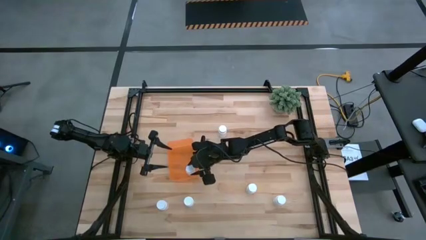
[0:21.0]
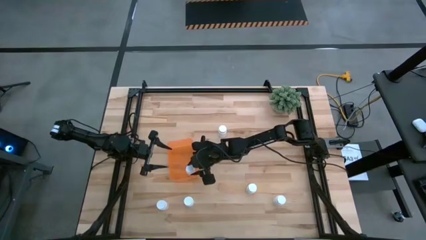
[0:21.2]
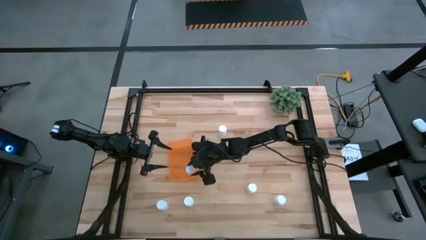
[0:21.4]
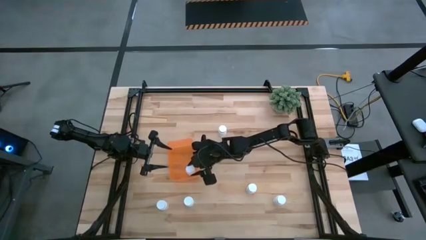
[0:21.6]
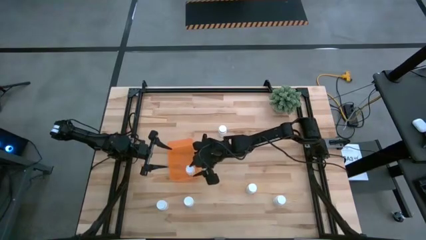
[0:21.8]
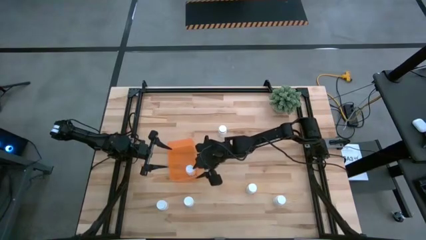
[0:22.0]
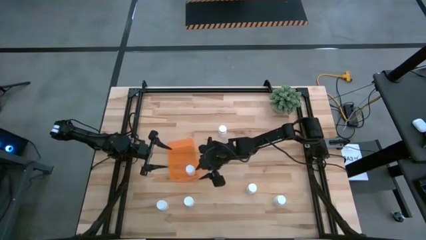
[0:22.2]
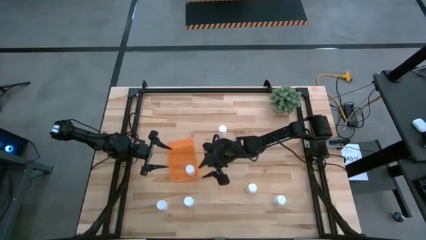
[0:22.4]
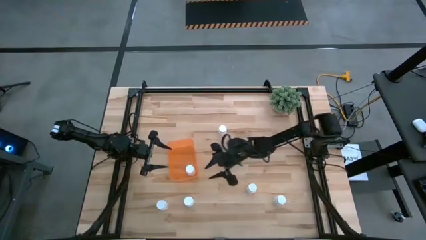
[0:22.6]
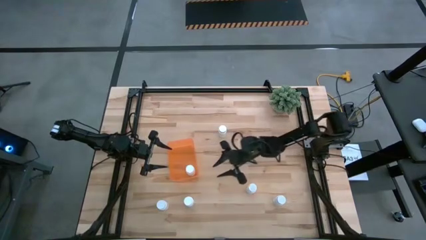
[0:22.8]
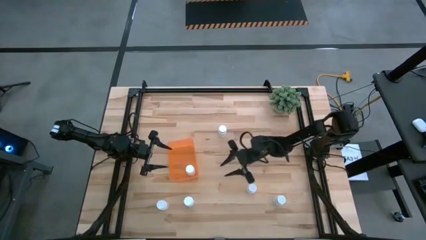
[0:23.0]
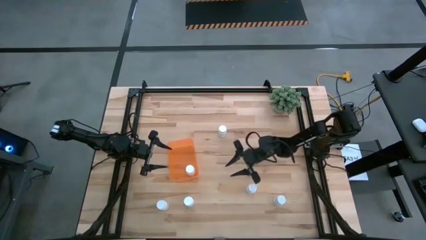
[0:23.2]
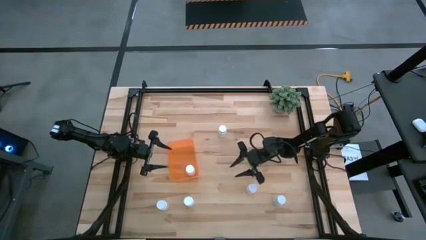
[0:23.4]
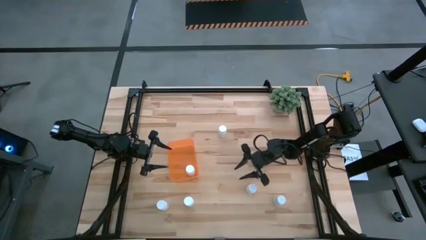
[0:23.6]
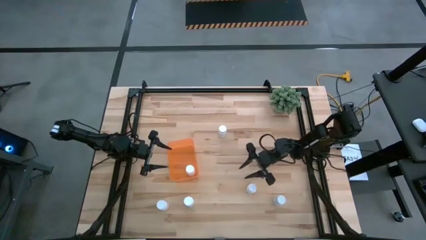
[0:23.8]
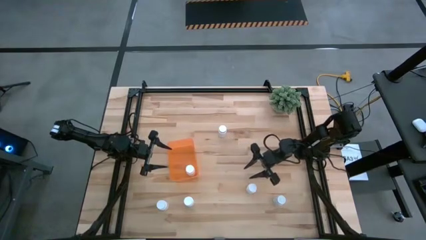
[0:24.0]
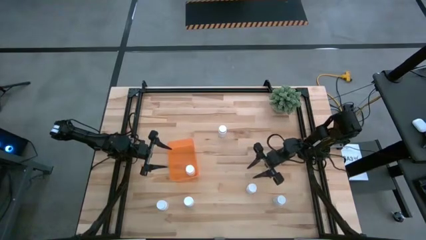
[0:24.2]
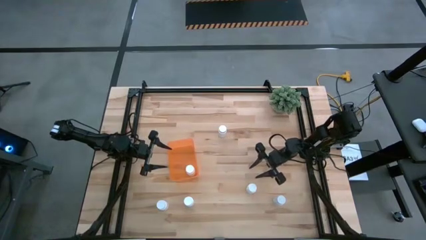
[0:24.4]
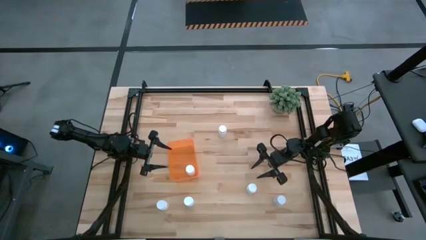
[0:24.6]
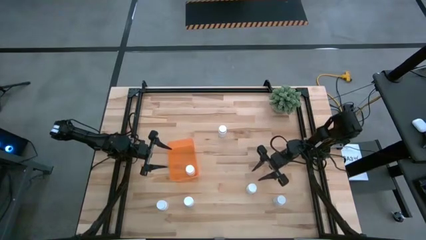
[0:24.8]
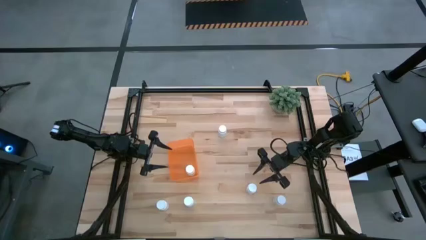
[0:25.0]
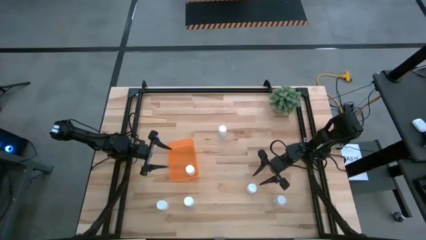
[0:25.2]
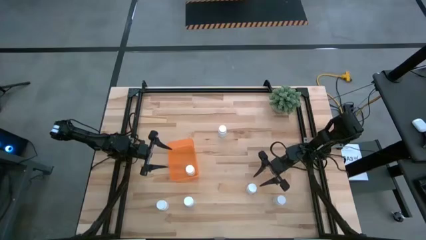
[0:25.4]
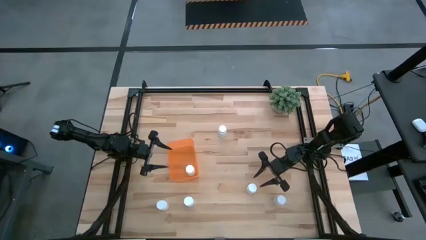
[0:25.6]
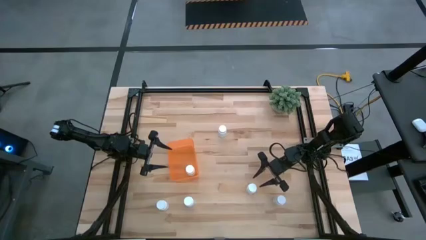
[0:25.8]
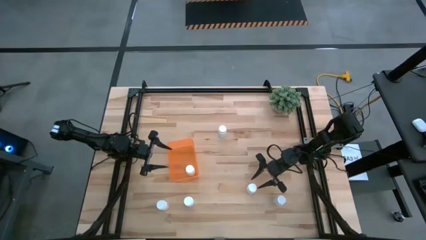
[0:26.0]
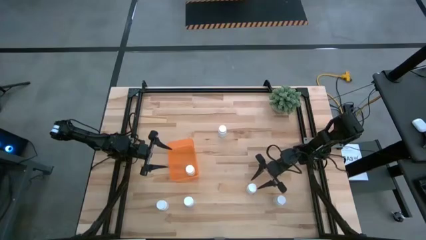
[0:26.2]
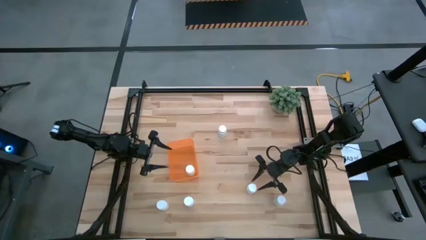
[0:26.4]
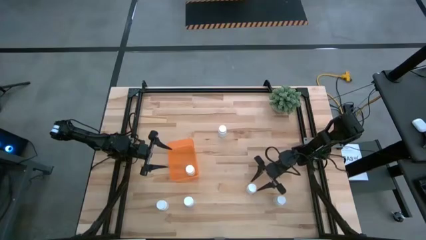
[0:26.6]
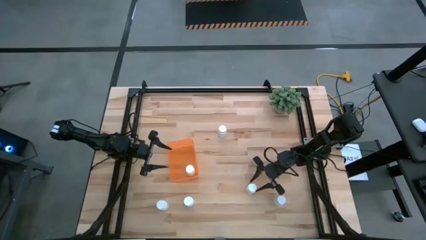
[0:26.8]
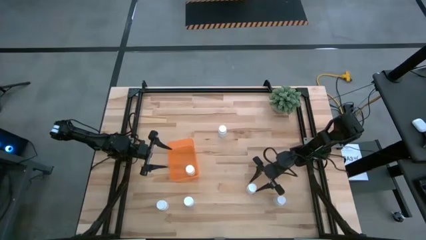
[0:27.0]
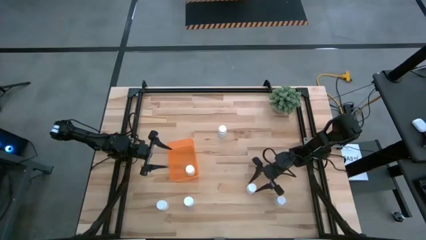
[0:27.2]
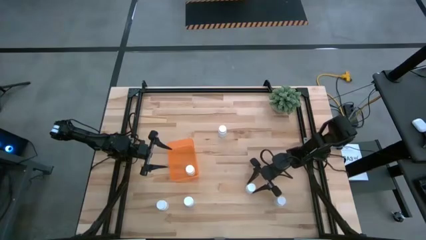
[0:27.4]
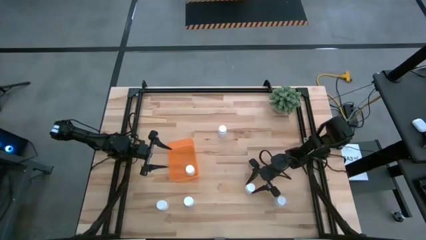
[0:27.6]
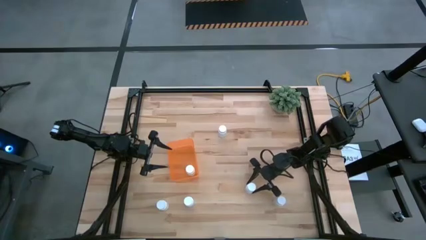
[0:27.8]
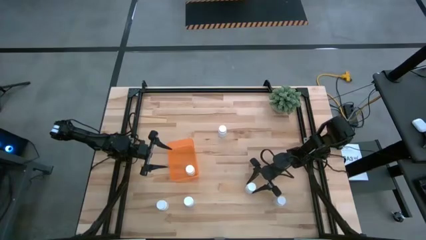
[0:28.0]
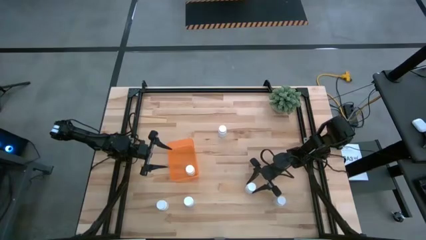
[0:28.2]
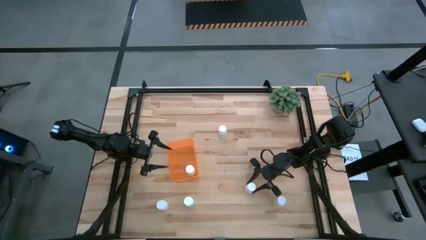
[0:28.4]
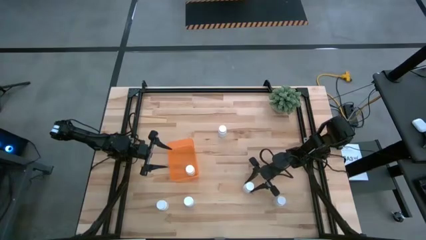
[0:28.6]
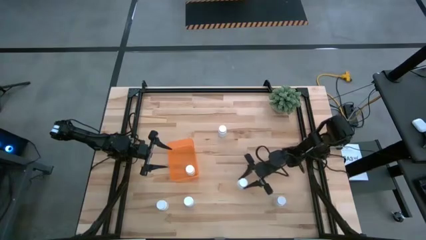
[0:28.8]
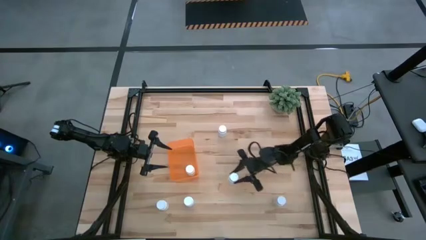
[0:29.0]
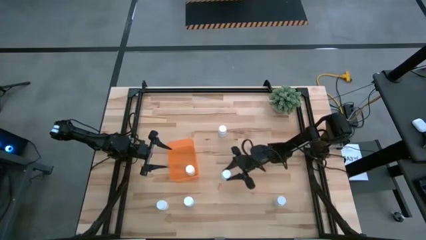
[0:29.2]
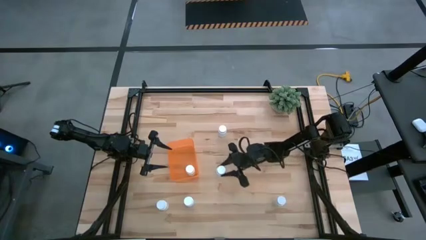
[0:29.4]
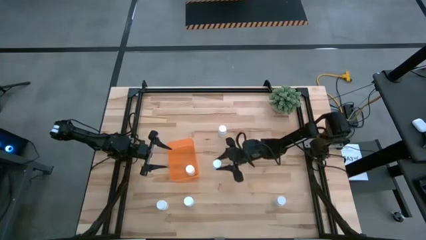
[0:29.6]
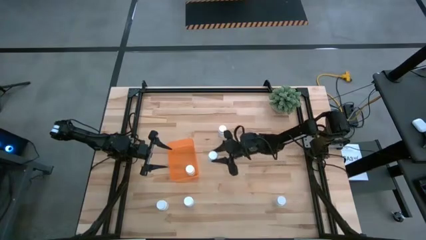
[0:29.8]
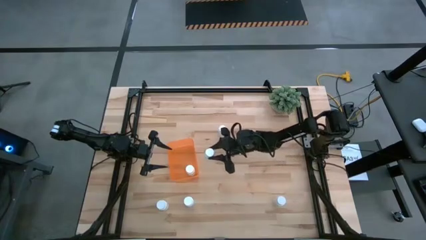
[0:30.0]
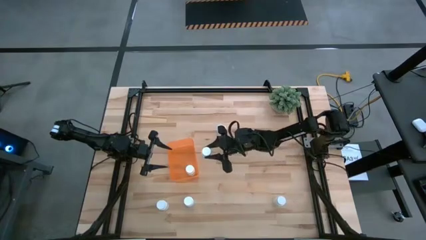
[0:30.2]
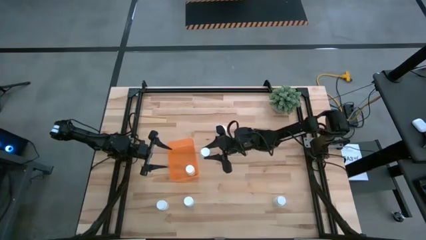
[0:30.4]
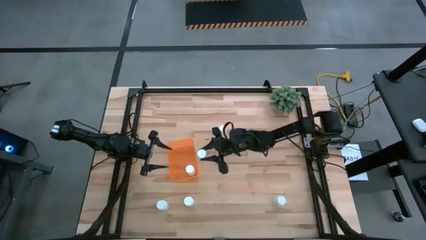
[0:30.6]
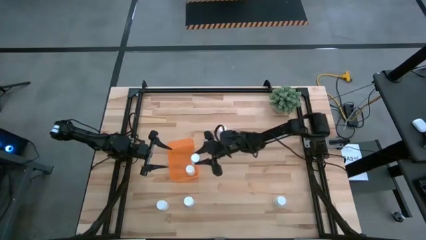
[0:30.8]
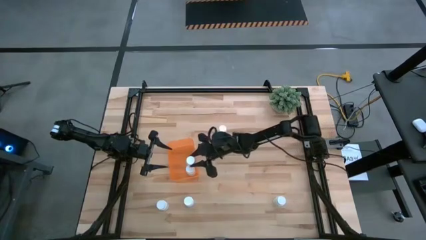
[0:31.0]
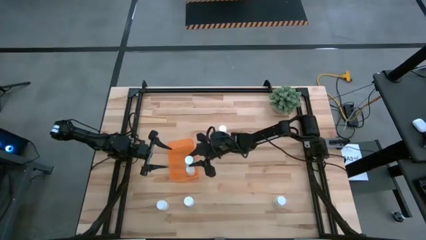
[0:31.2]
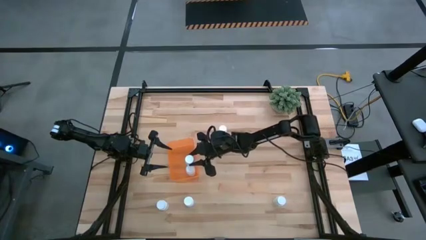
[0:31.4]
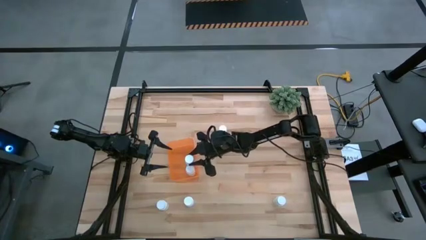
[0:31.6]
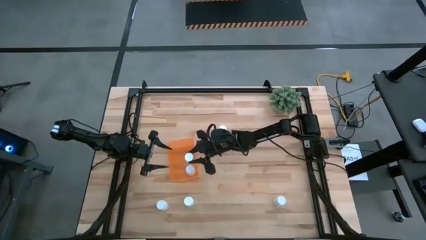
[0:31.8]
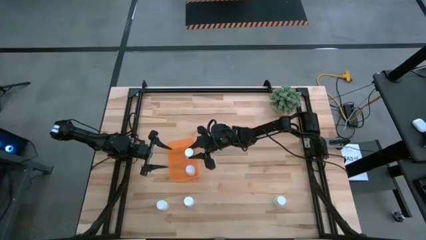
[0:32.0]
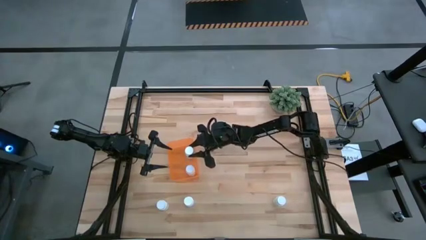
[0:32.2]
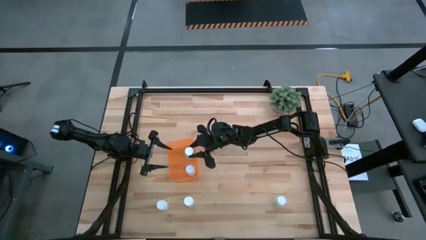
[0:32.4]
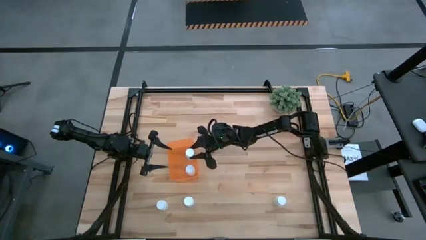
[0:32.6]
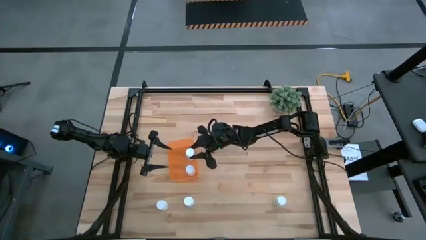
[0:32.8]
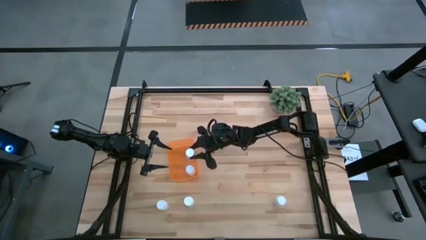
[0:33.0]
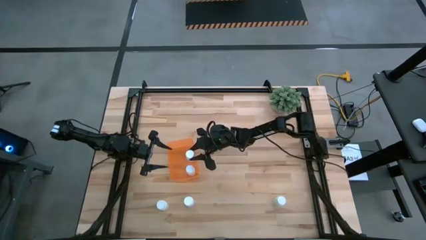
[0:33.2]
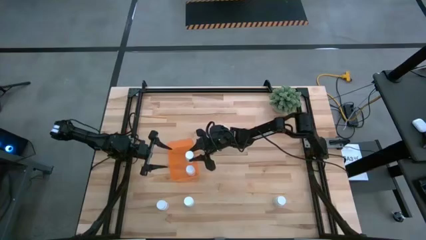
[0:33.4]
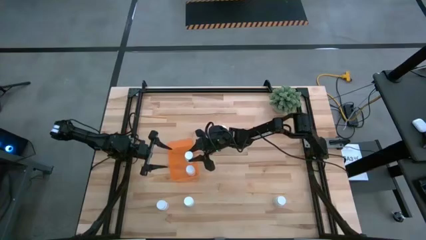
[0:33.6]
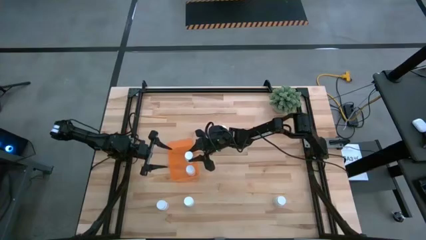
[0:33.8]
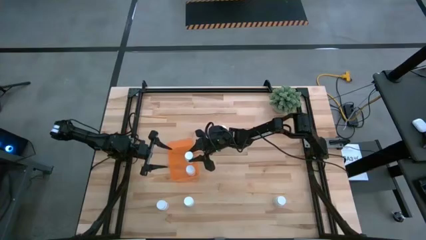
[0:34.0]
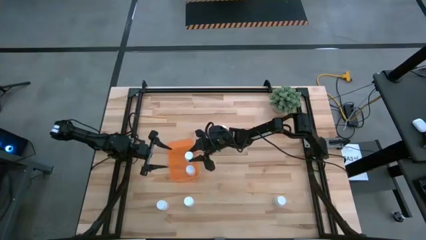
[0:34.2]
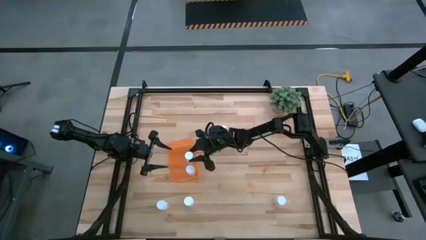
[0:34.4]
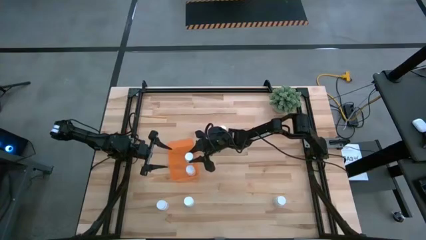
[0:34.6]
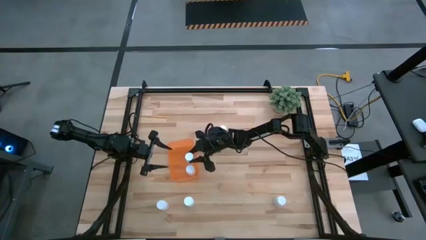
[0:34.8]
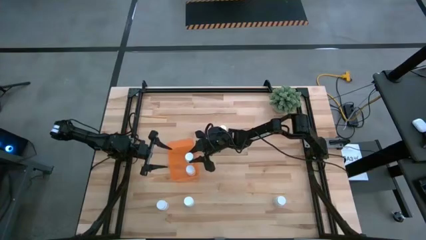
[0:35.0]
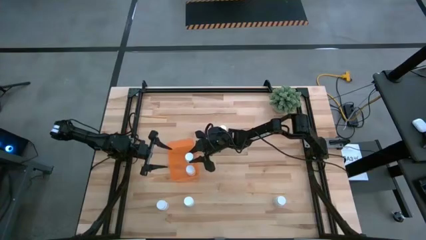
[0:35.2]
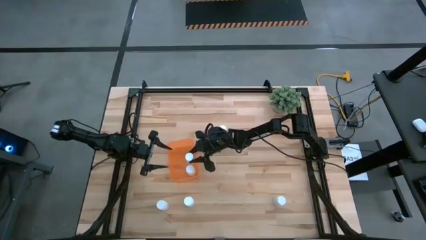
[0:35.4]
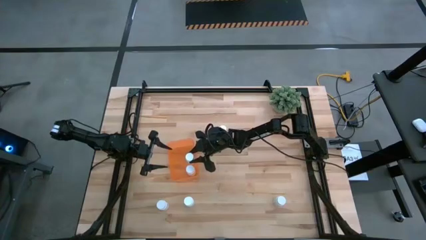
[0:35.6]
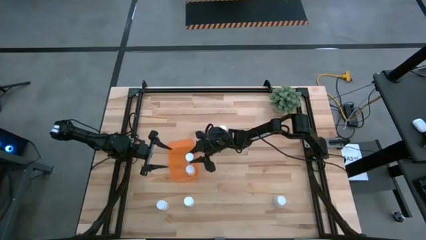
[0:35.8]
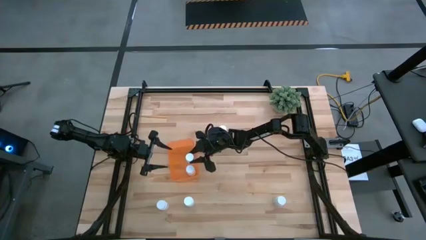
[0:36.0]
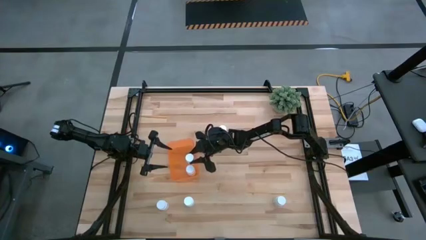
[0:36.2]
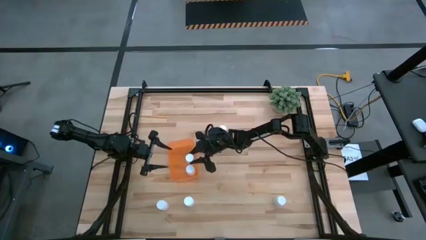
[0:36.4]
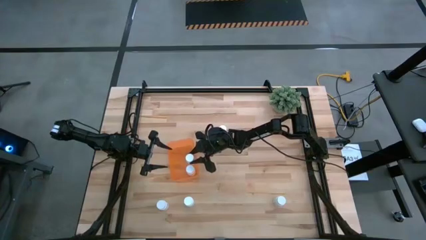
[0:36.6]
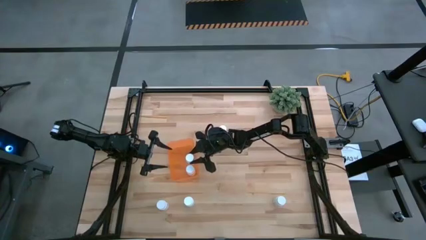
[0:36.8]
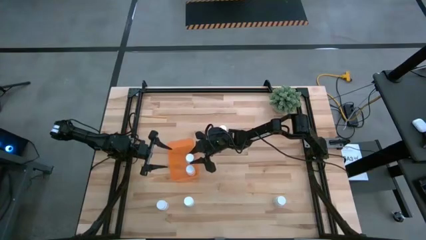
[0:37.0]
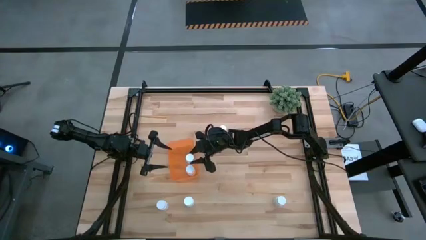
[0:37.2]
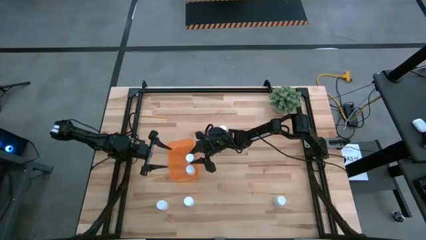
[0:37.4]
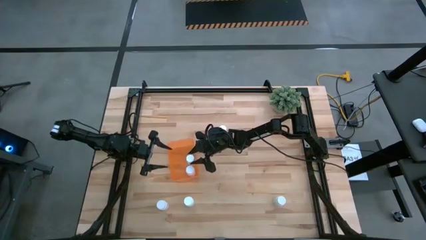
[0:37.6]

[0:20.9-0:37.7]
Task: Pick and place pill bottles into a basket
Put the white medicine bottle into the orange bin
